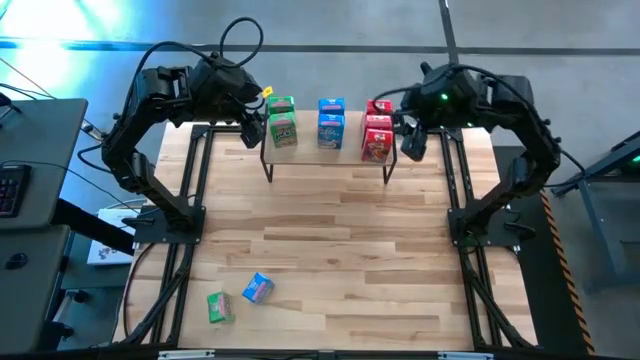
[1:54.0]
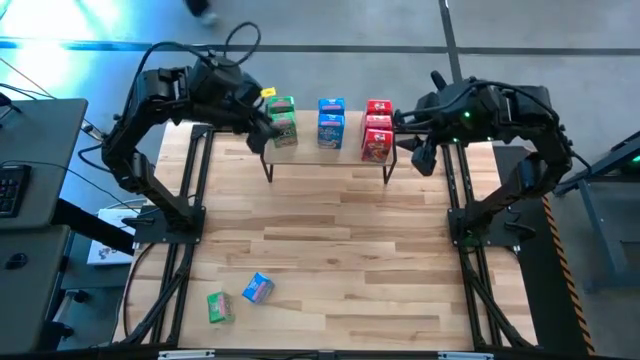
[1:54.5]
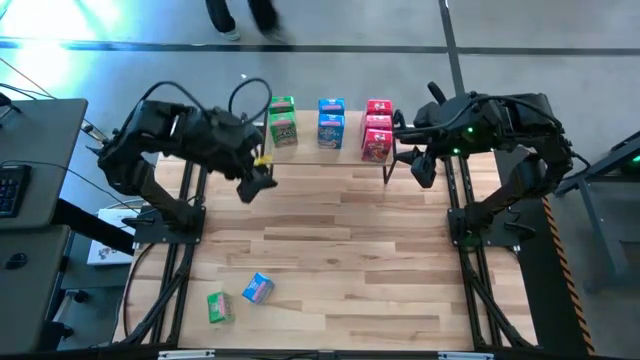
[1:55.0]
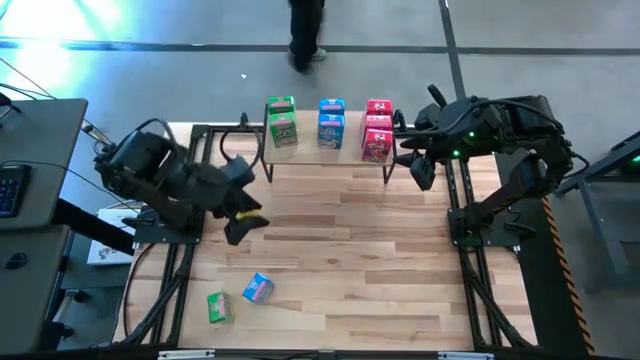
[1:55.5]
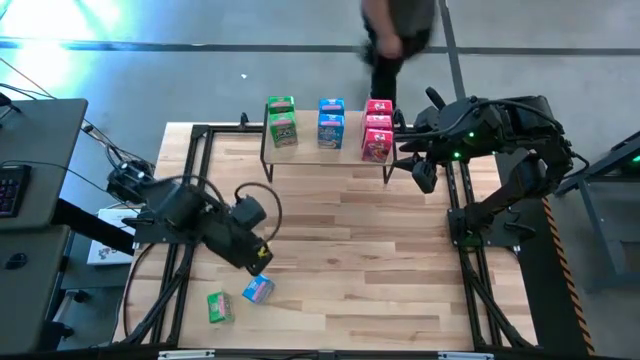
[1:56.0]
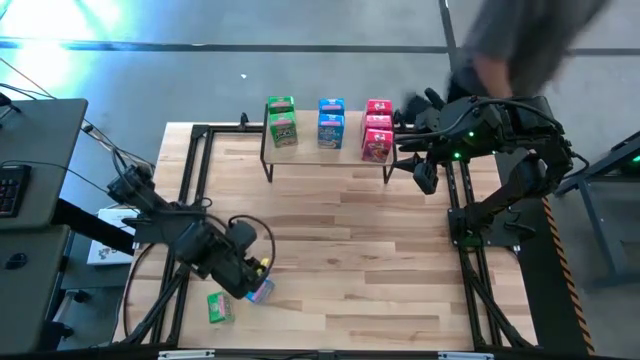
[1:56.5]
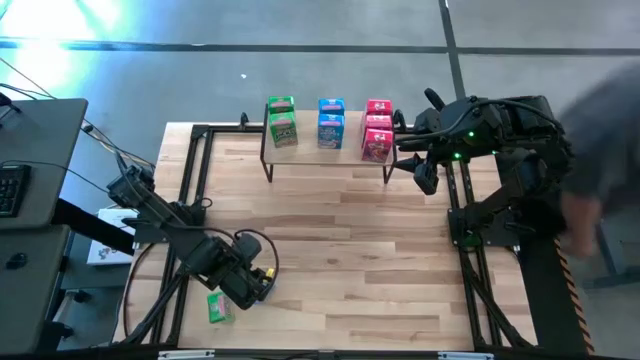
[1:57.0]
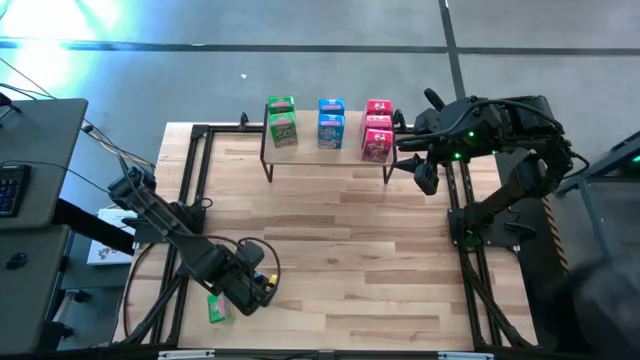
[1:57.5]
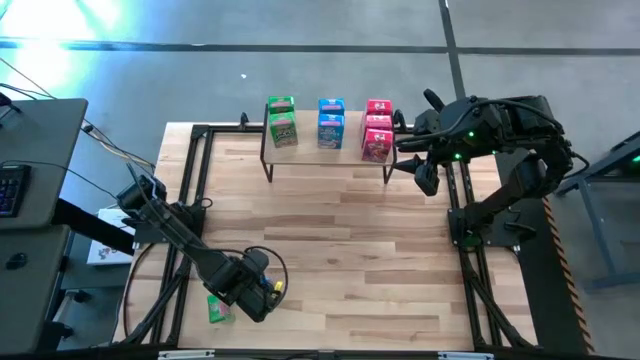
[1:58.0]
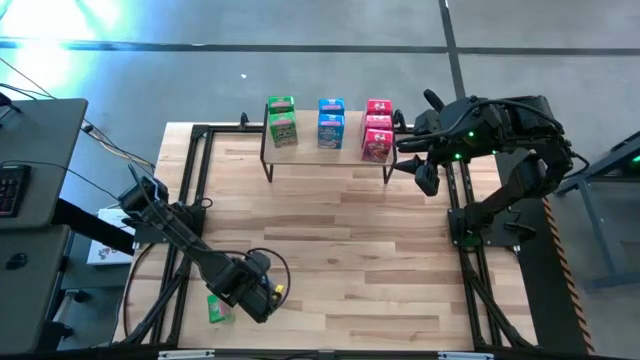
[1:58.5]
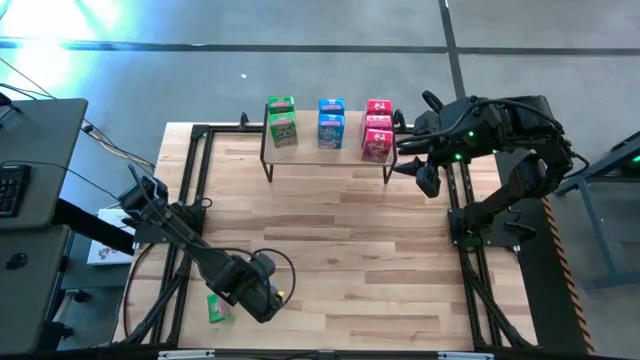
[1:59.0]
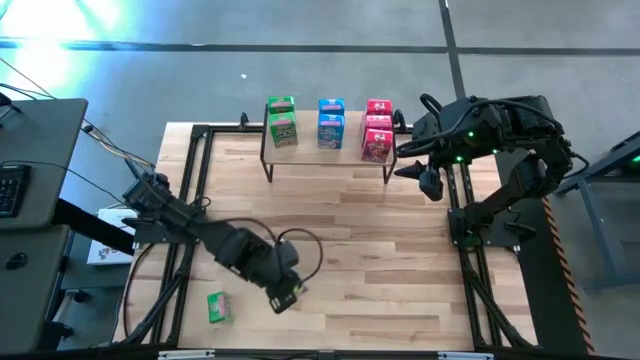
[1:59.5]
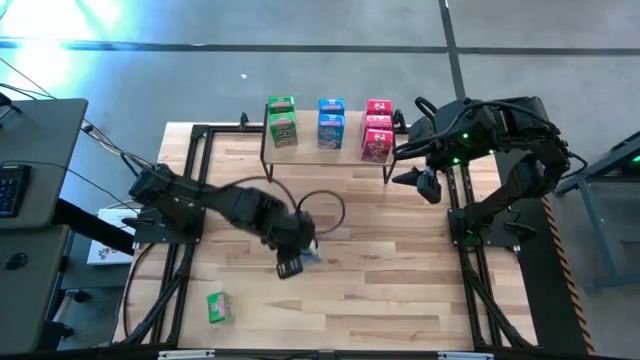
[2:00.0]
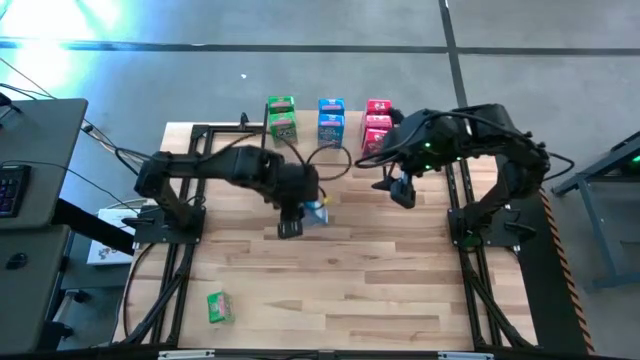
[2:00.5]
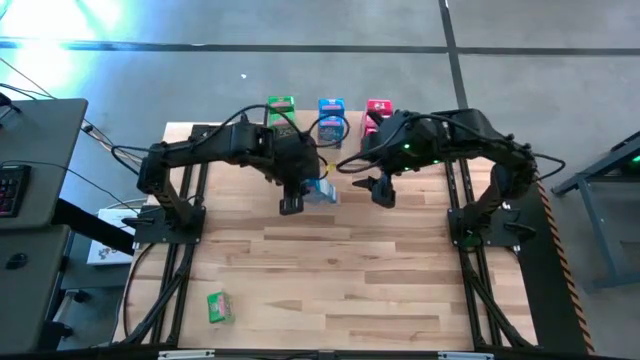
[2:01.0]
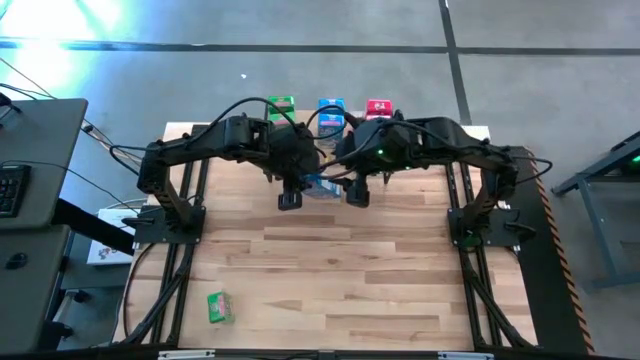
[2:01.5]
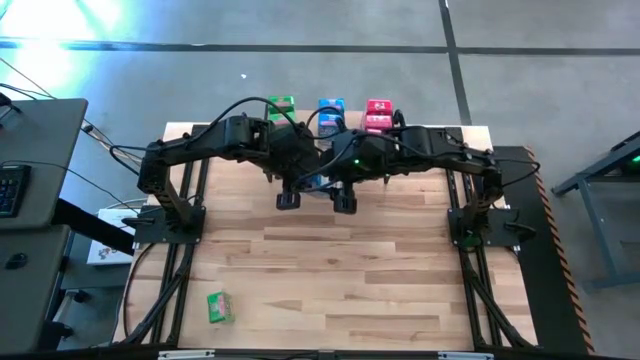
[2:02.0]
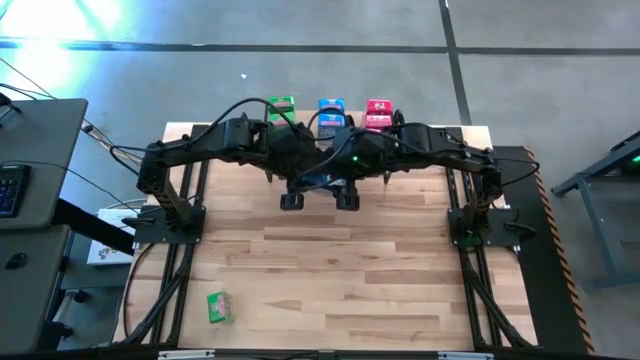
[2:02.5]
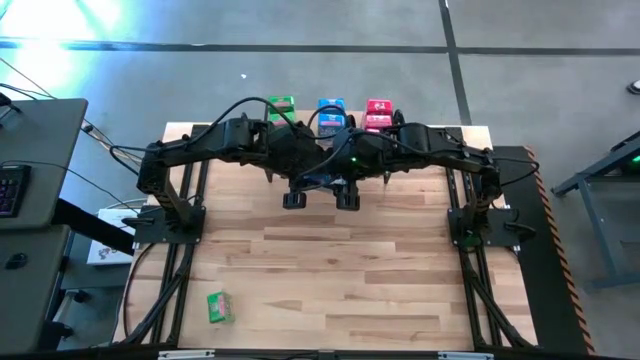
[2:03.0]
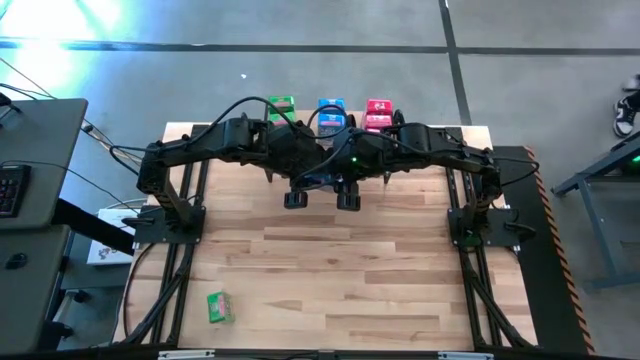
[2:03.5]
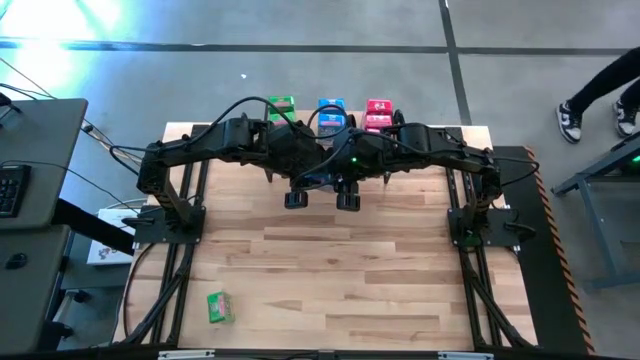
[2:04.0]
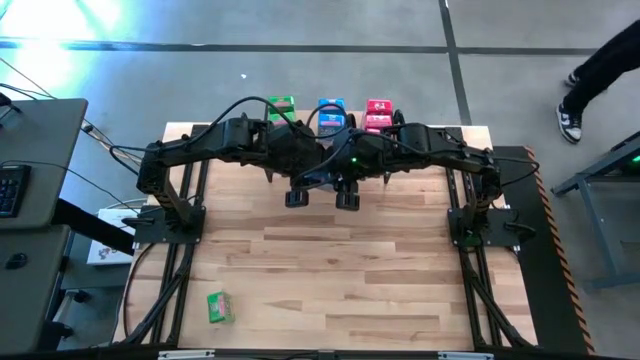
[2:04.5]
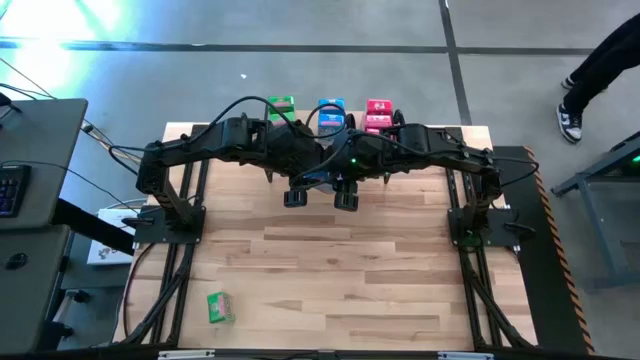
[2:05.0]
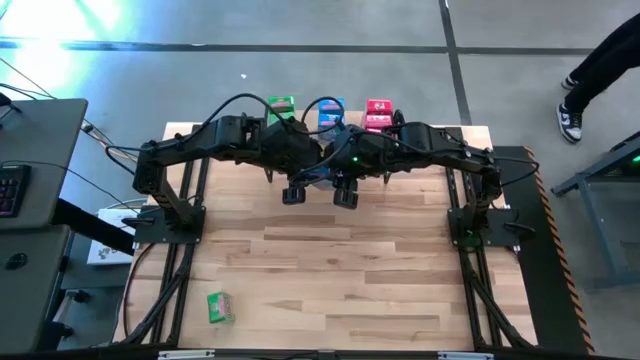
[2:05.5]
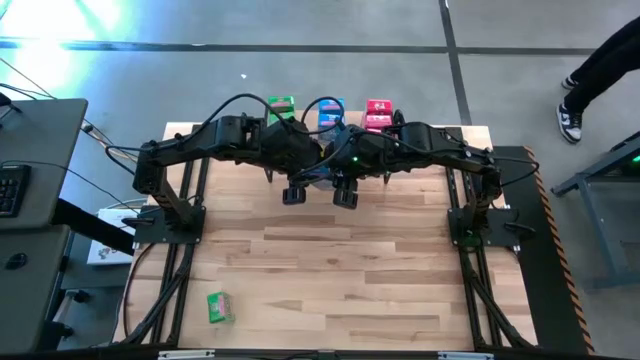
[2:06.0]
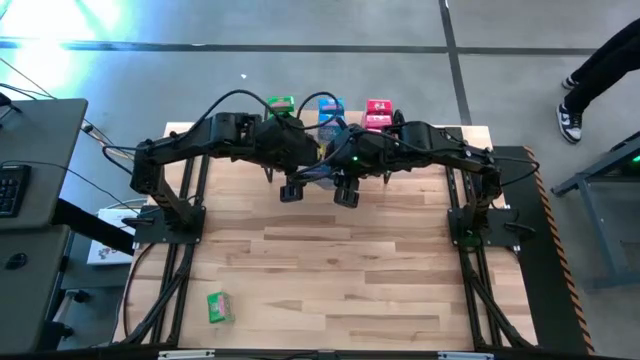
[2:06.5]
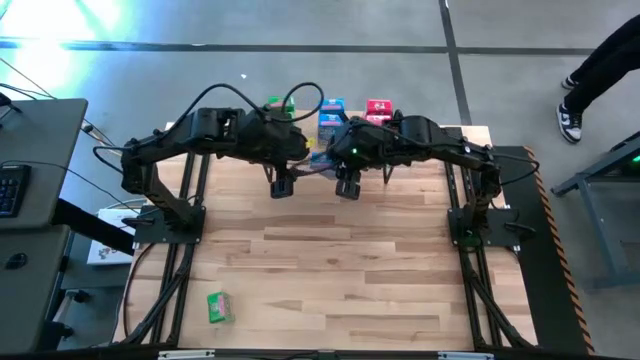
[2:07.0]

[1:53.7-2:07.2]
Task: Stack cereal on shelf
Put the blue cereal box on the shelf

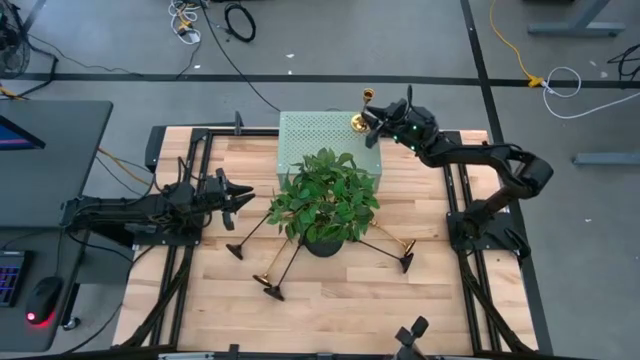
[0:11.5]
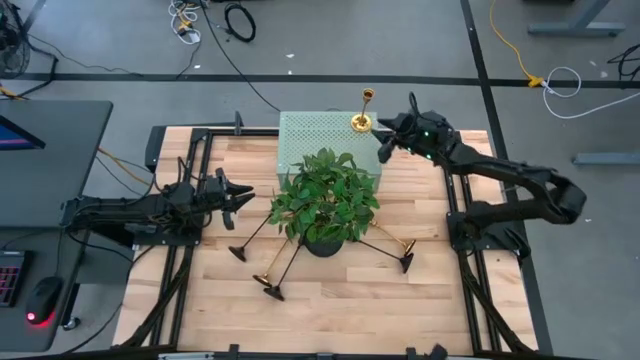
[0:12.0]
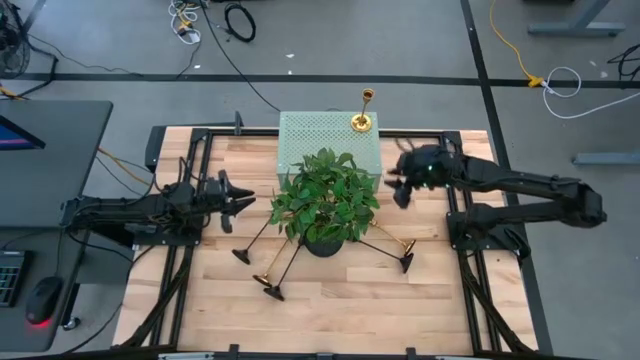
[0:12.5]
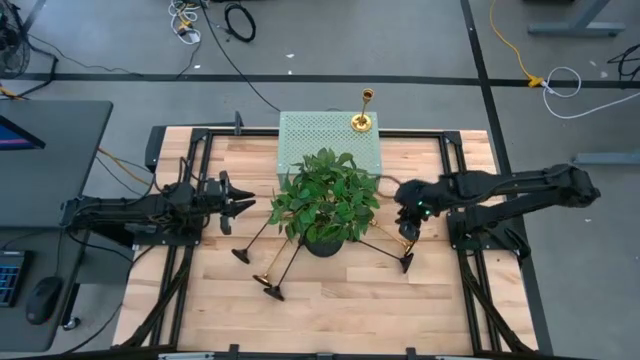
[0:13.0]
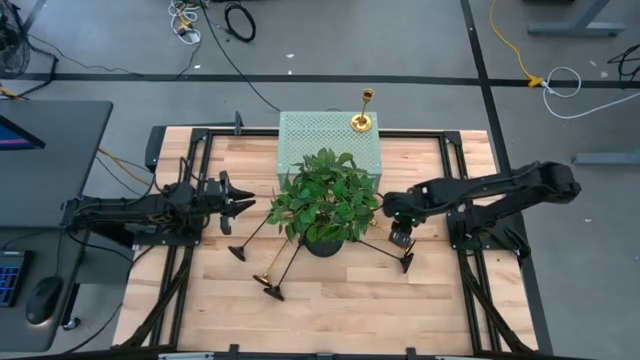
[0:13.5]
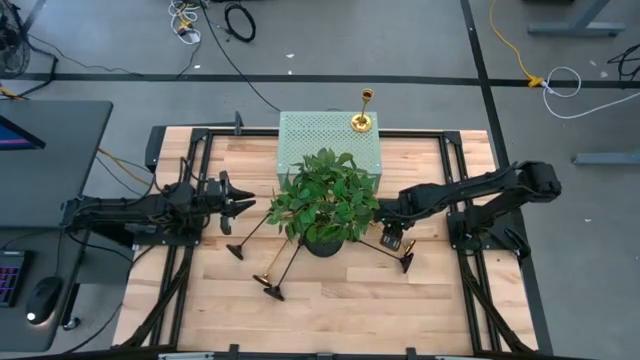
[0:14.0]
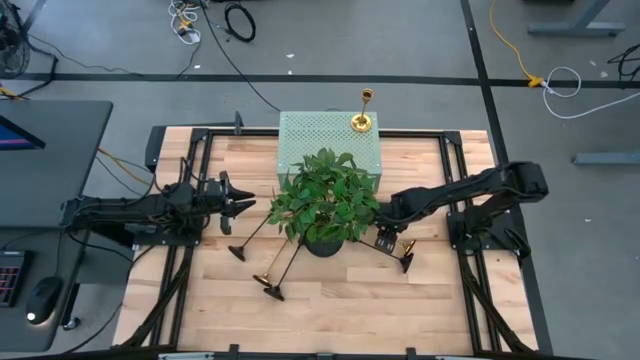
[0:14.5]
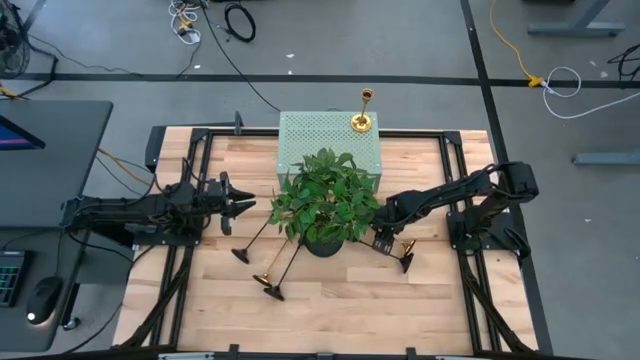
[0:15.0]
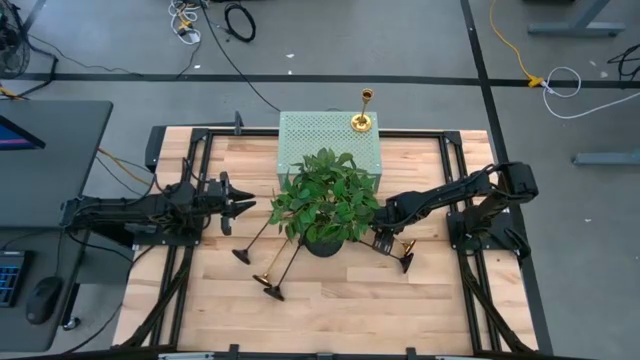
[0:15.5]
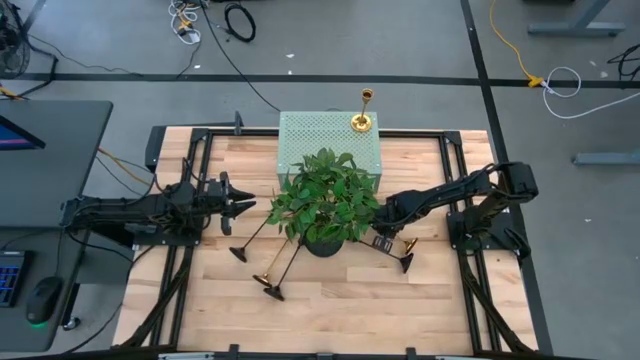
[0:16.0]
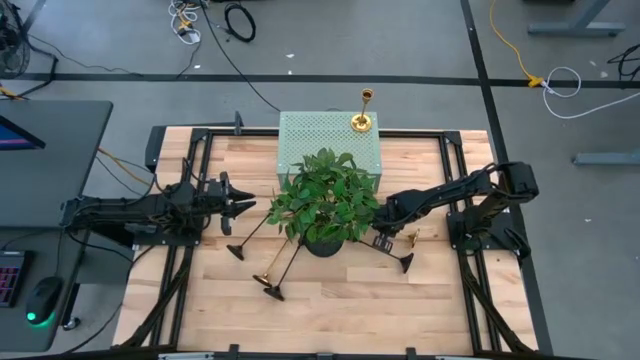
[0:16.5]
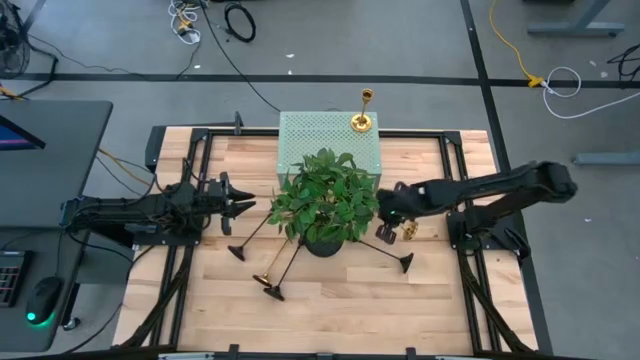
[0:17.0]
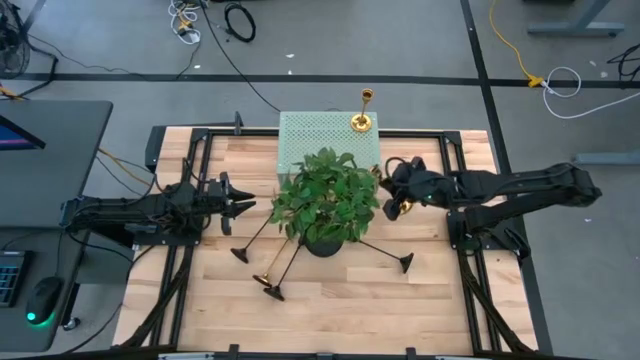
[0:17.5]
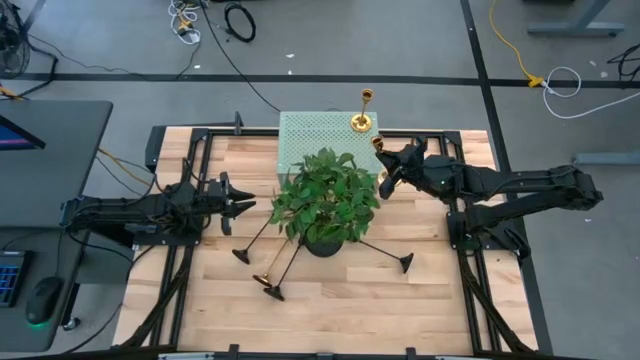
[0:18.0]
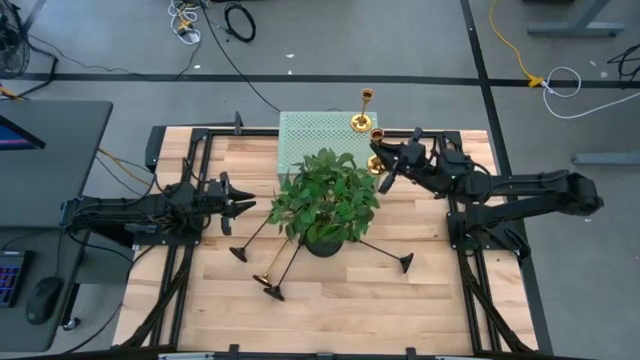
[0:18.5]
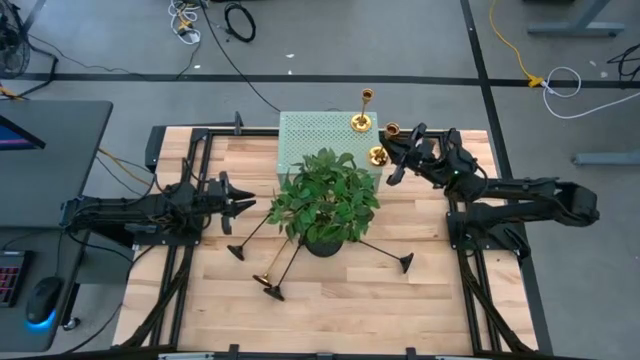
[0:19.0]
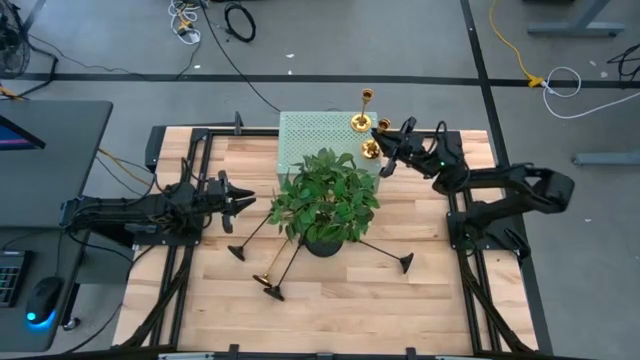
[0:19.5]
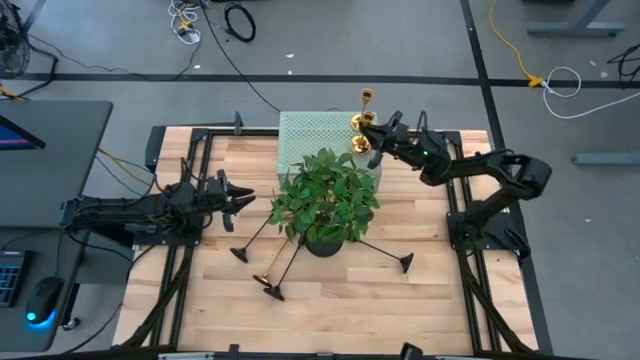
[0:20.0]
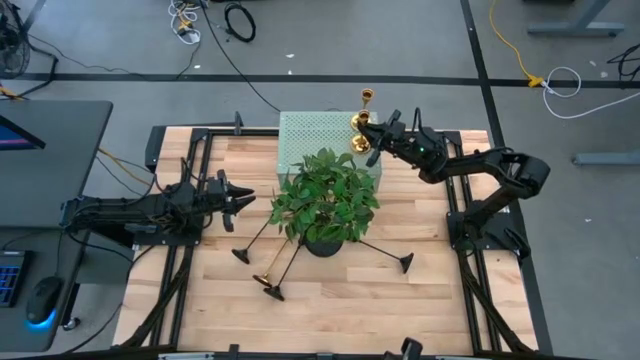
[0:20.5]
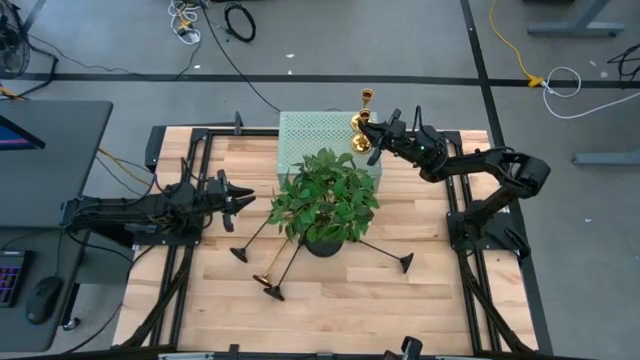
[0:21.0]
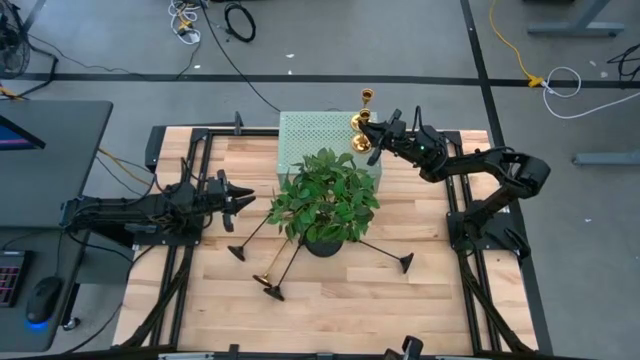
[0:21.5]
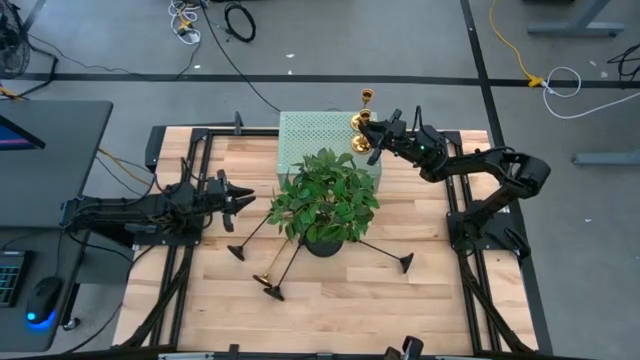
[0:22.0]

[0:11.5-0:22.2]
Task: Pick & Place candle stick holders
Put the right gold candle holder on the shelf aligned with the other gold candle holder
